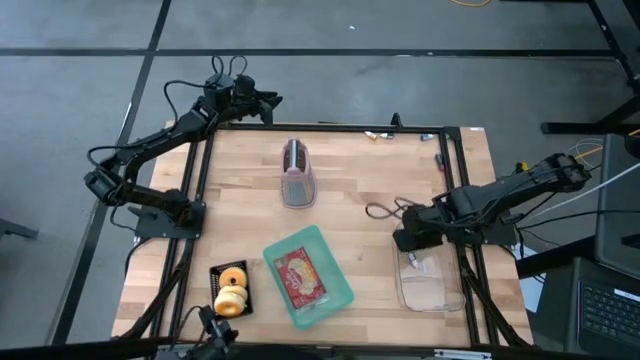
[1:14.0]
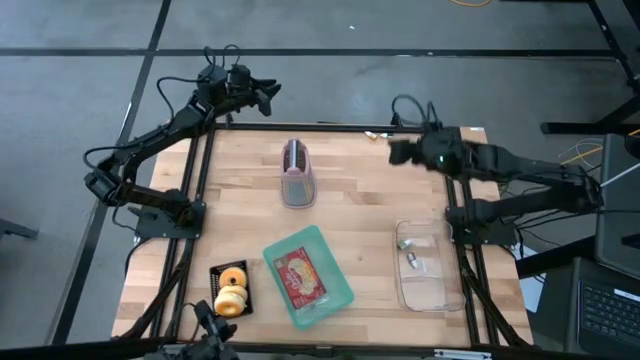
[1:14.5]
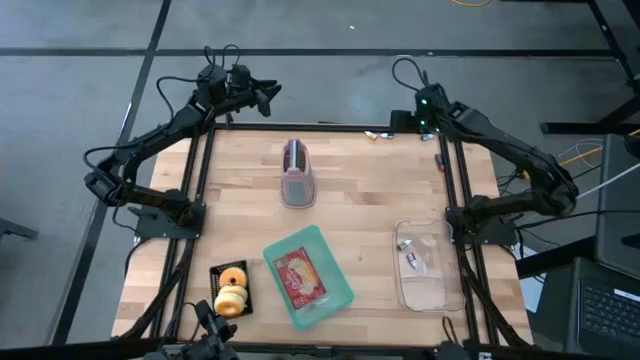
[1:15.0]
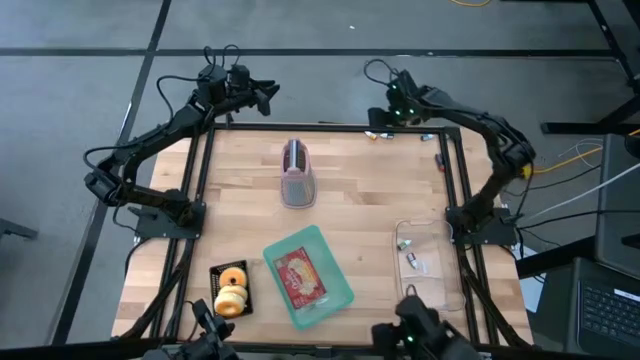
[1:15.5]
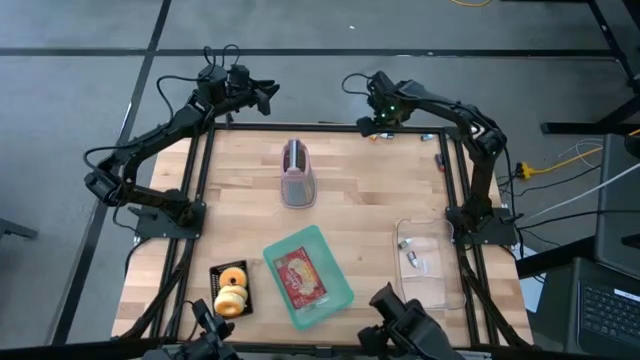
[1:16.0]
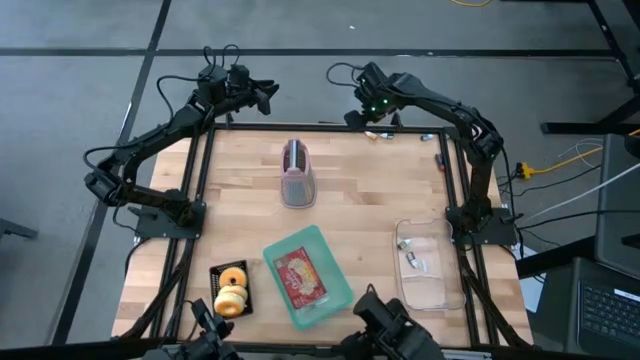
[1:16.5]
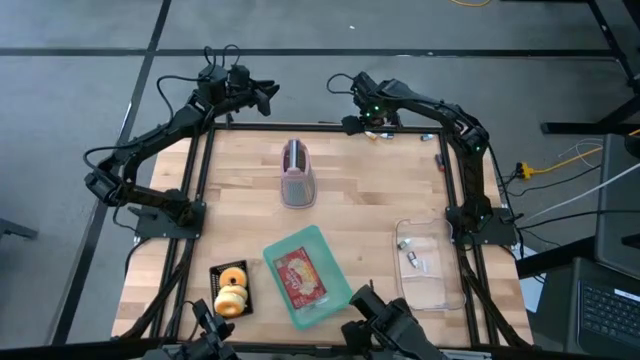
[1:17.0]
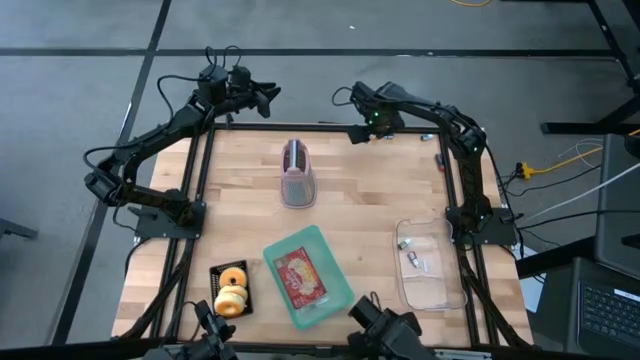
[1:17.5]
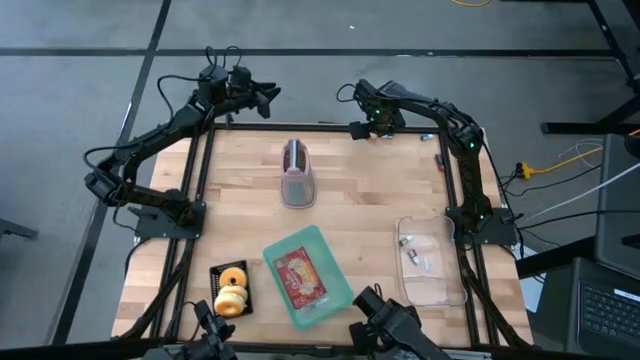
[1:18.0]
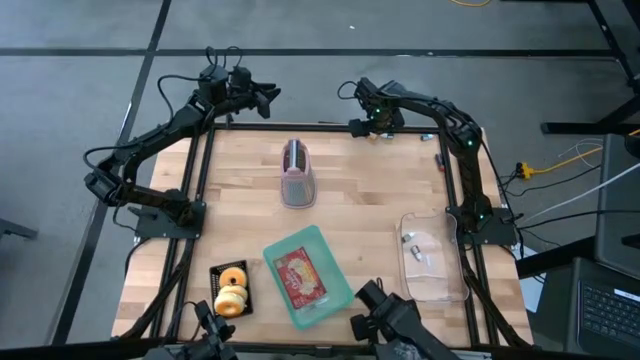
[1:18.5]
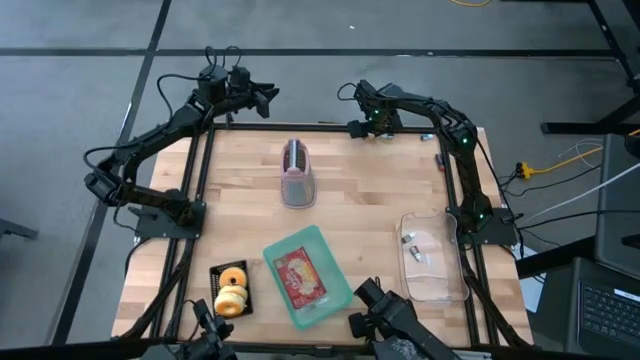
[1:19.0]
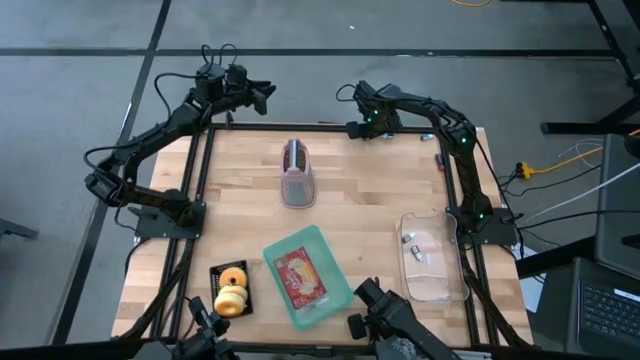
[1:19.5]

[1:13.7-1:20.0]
Task: Pick & Place Food Item
Put the yellow food coloring bottle into the transparent bin

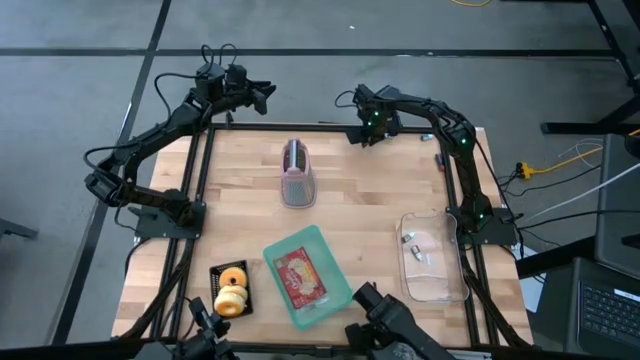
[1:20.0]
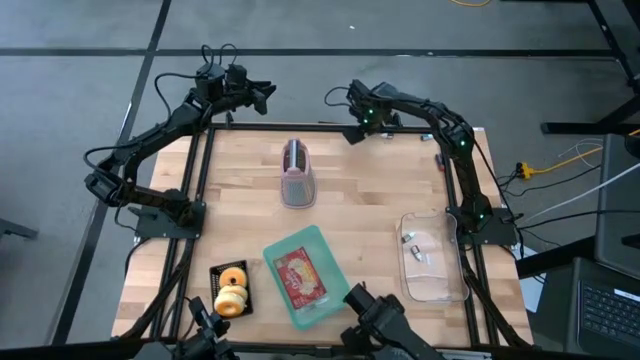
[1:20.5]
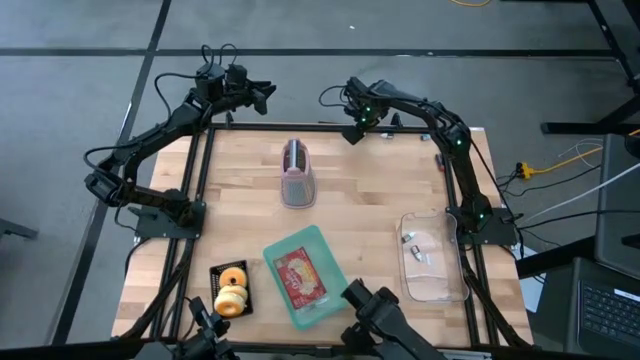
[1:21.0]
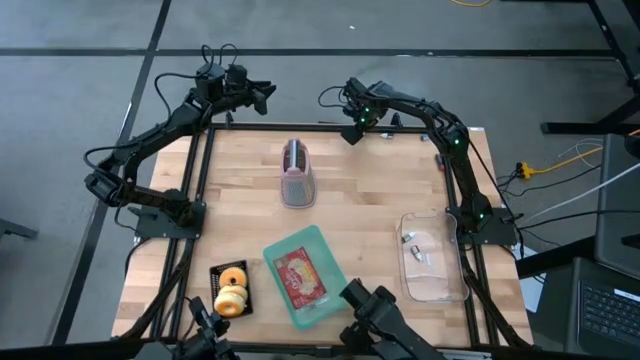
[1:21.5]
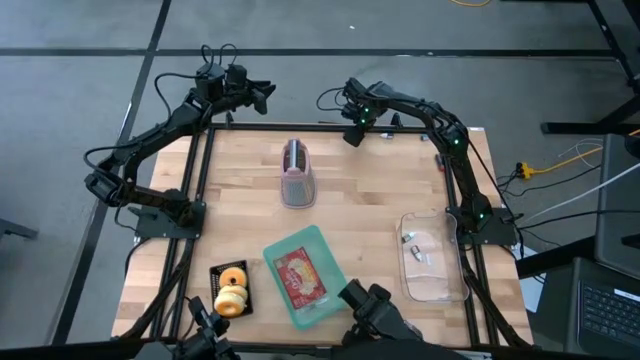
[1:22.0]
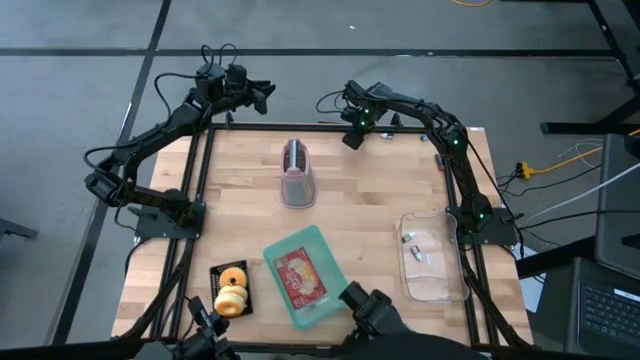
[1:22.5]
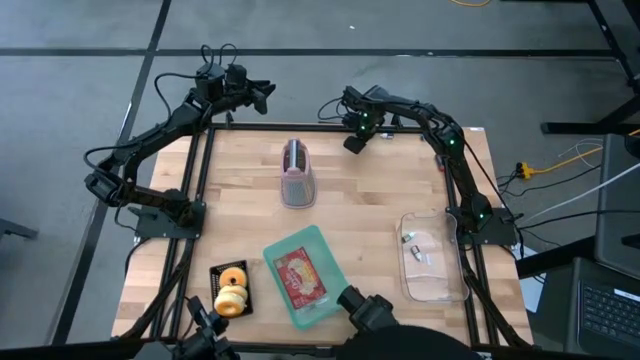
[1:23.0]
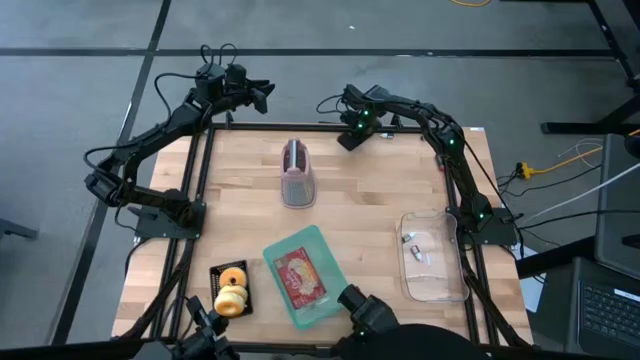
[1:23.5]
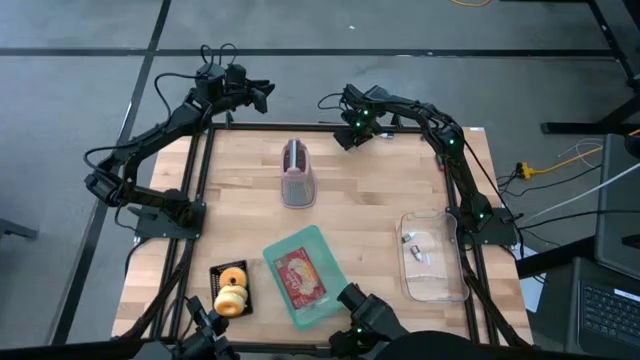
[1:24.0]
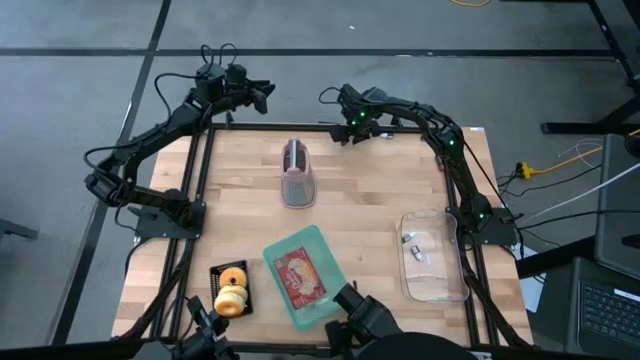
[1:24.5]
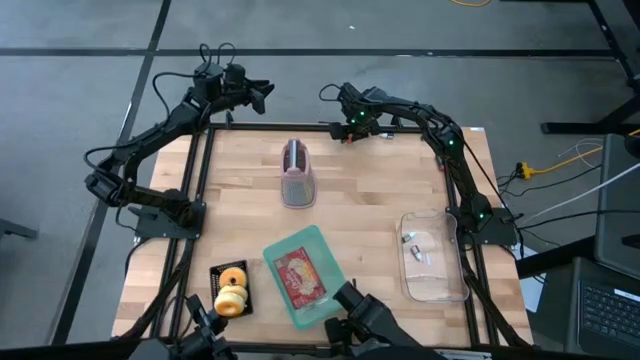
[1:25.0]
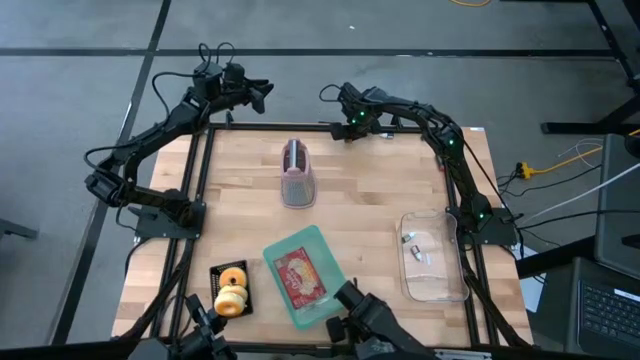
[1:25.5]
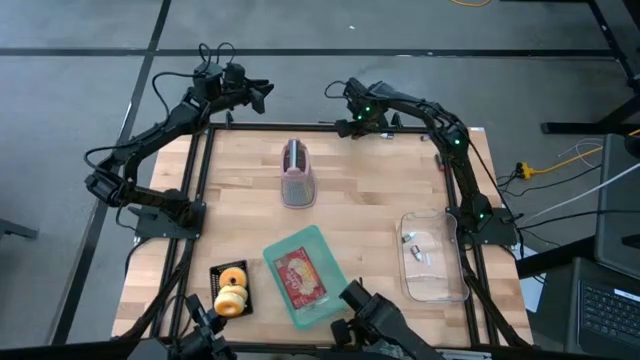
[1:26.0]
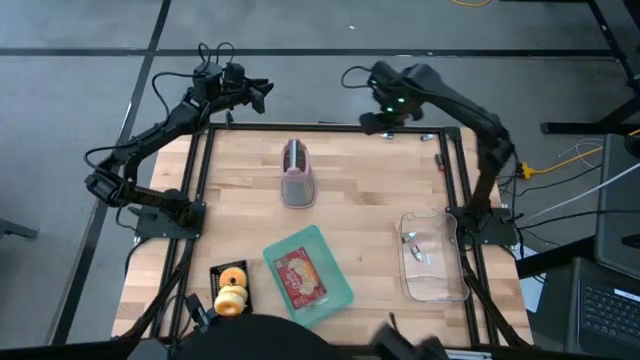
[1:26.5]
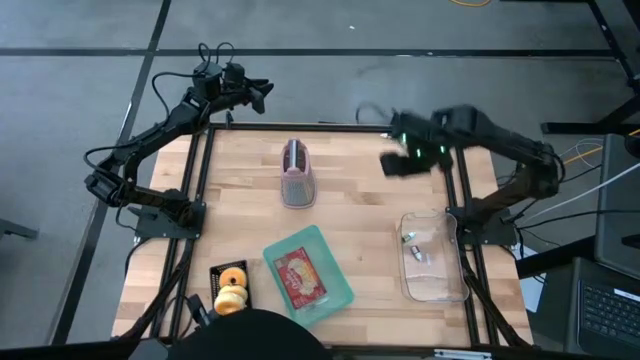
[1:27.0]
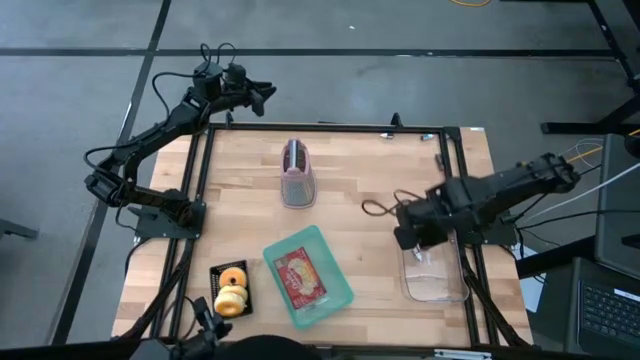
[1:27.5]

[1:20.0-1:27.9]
Put the yellow food coloring bottle into the transparent bin

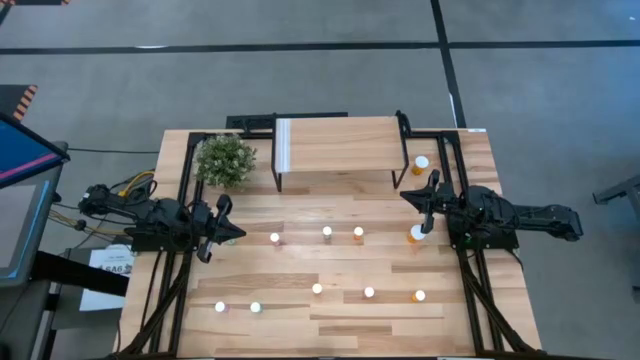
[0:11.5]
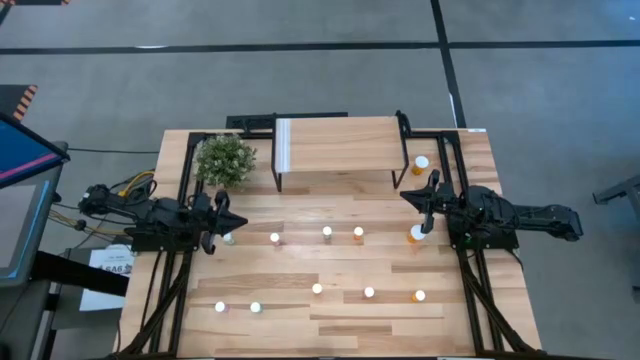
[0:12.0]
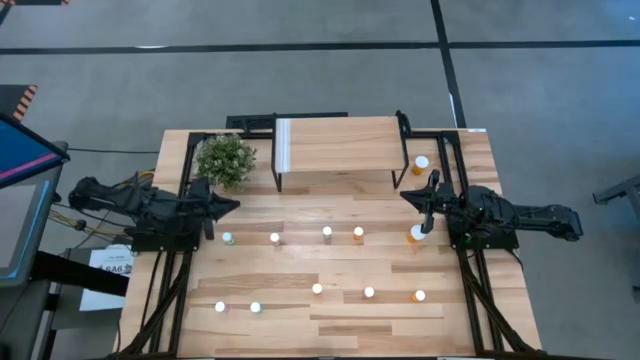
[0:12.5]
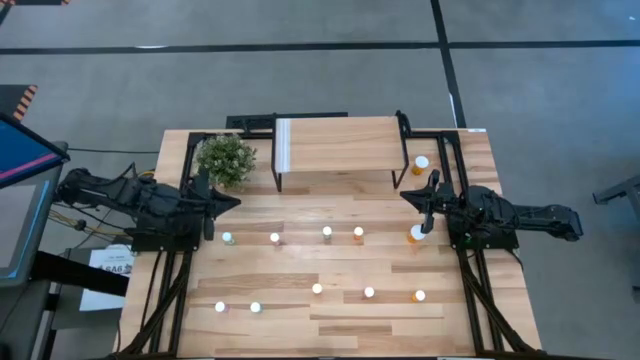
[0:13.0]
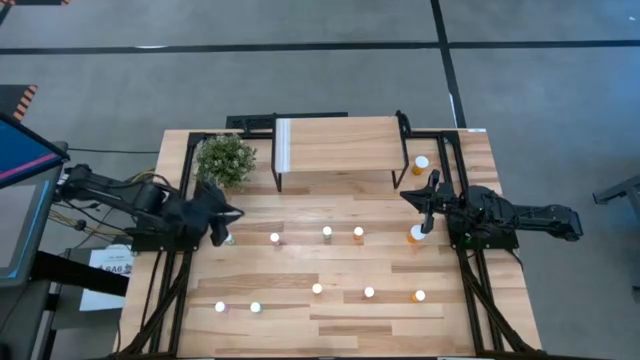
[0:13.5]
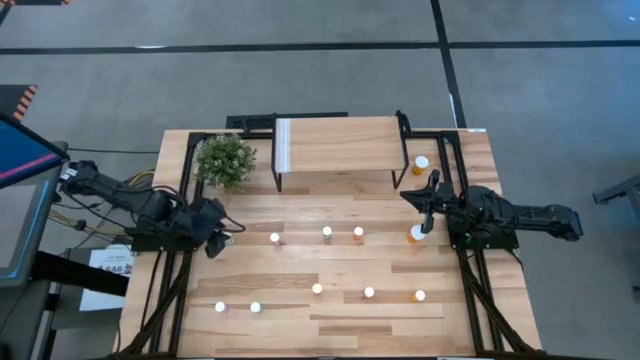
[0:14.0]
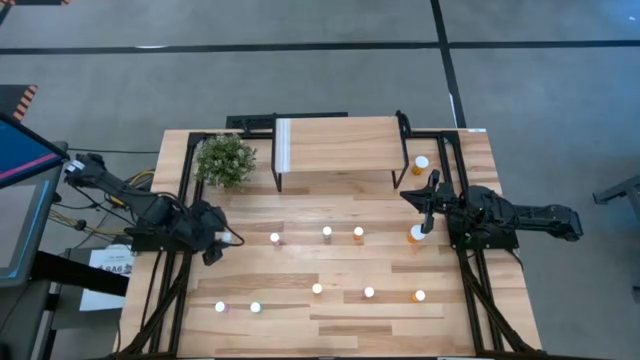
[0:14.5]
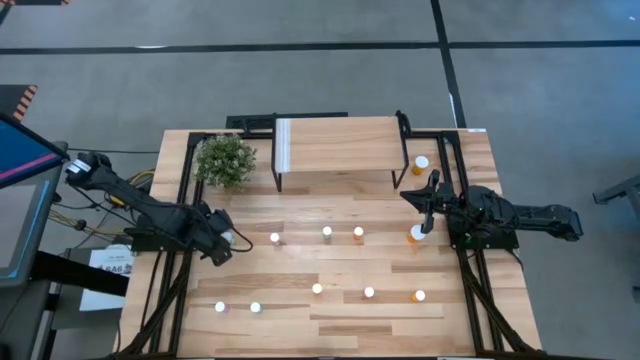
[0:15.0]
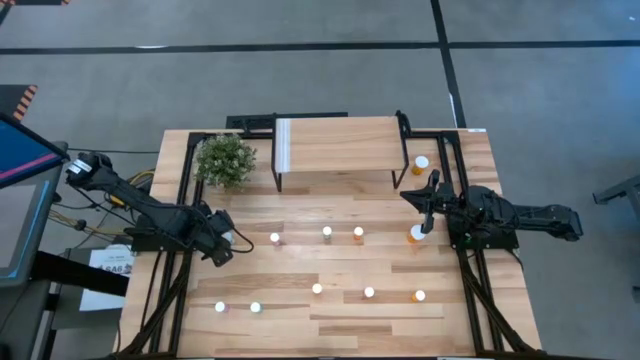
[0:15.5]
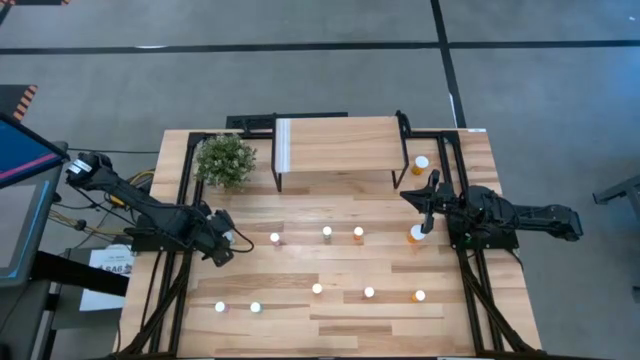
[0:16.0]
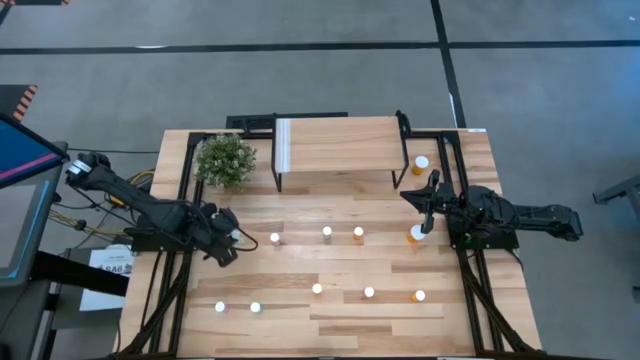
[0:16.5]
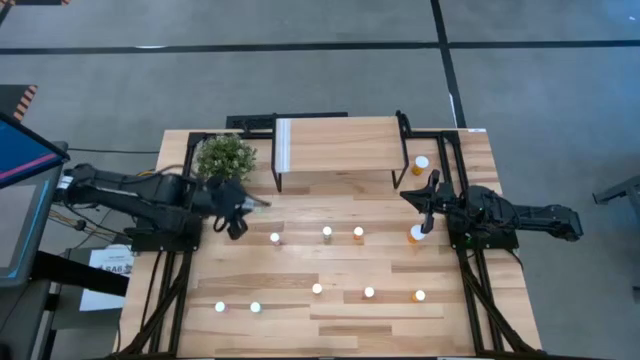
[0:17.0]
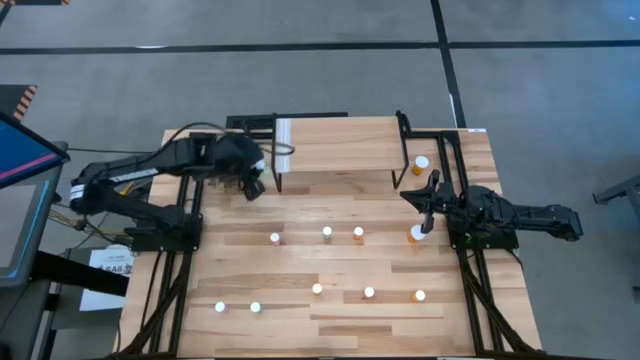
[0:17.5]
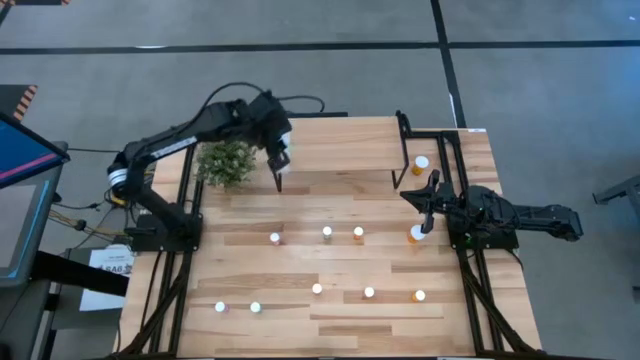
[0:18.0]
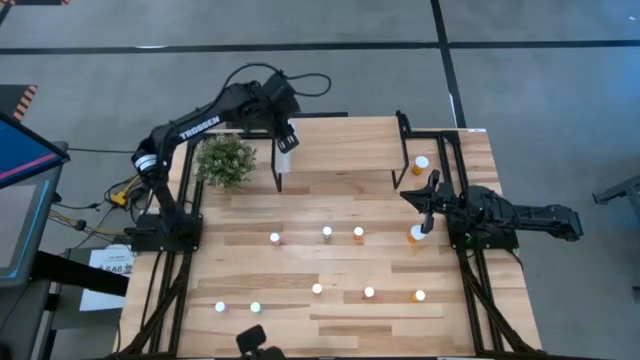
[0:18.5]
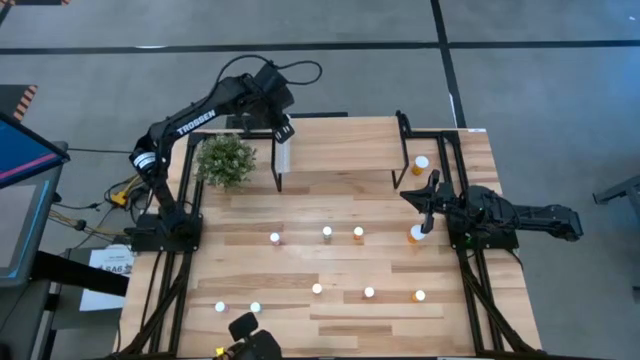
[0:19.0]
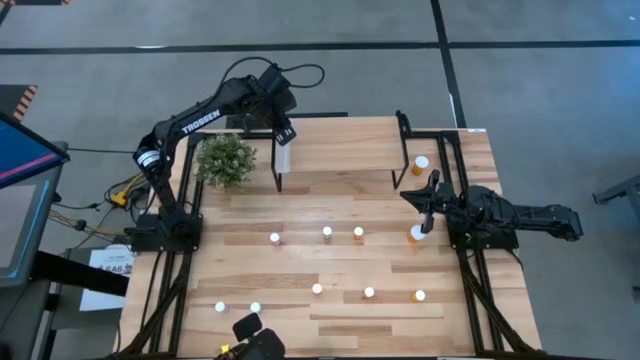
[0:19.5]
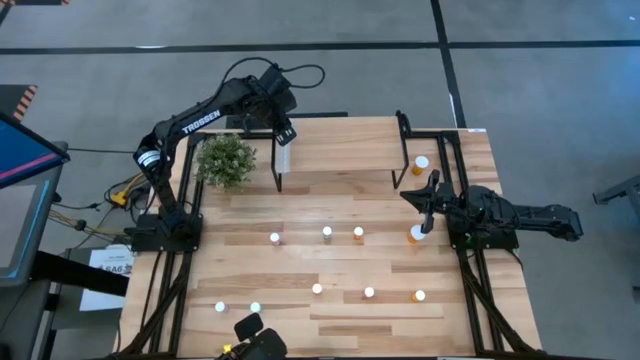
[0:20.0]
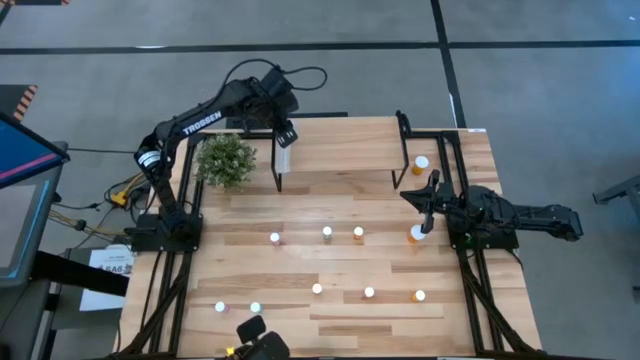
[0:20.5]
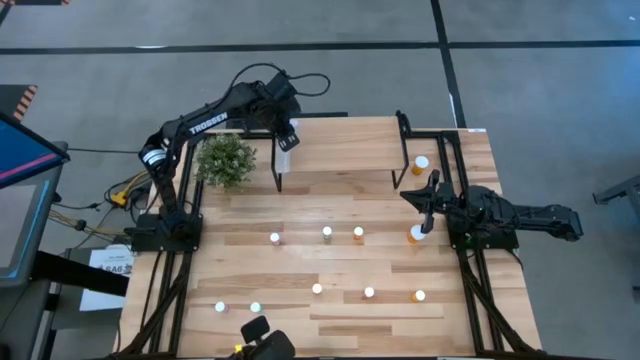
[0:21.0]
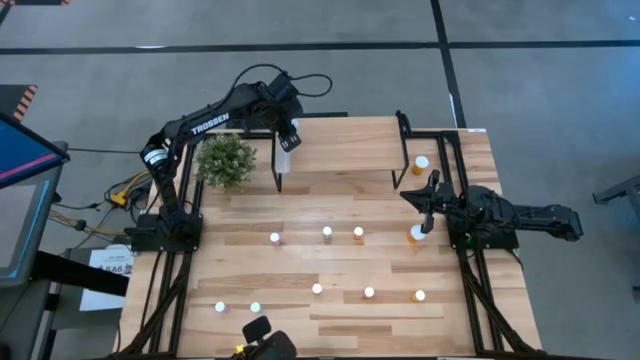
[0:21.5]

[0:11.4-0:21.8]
Task: Pick and place medicine bottles onto shelf by color
Put the small left blue pill bottle on the shelf
